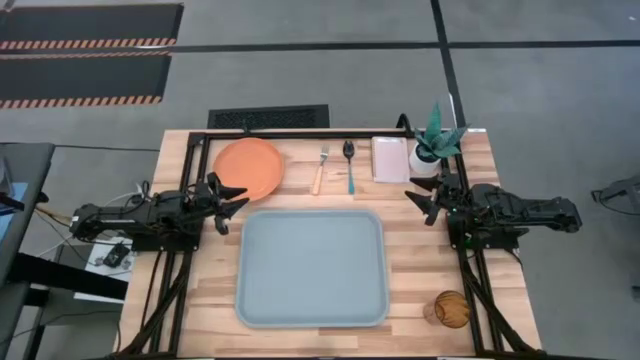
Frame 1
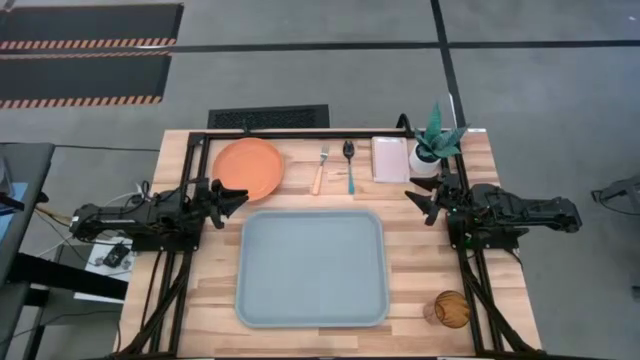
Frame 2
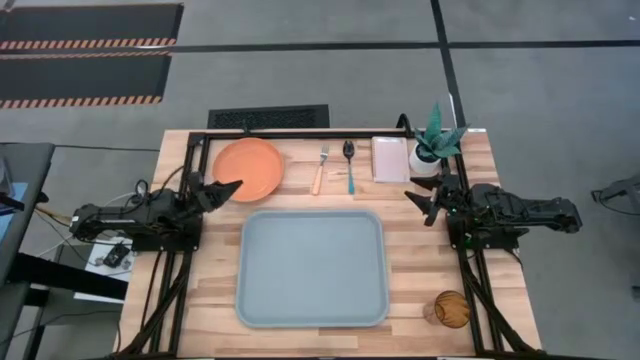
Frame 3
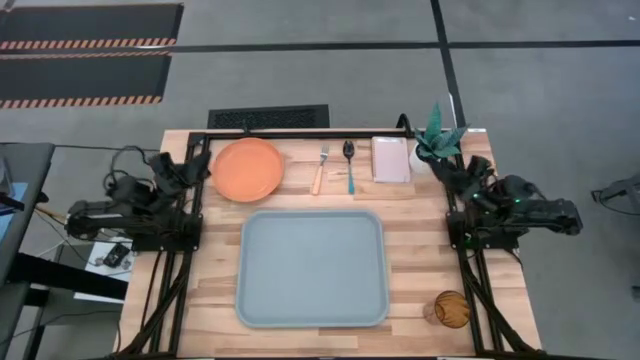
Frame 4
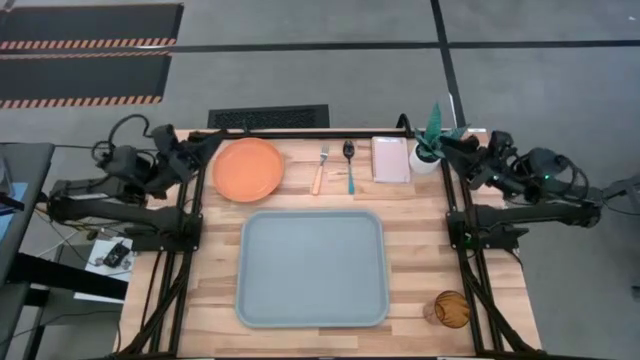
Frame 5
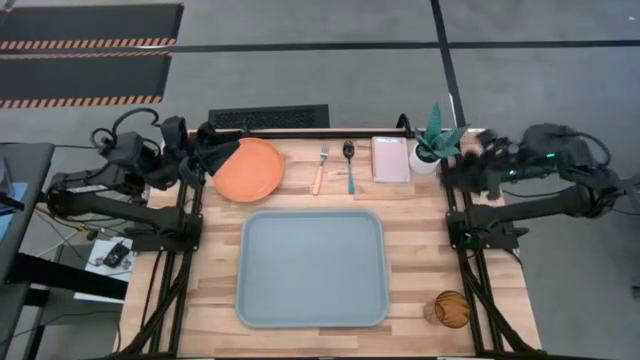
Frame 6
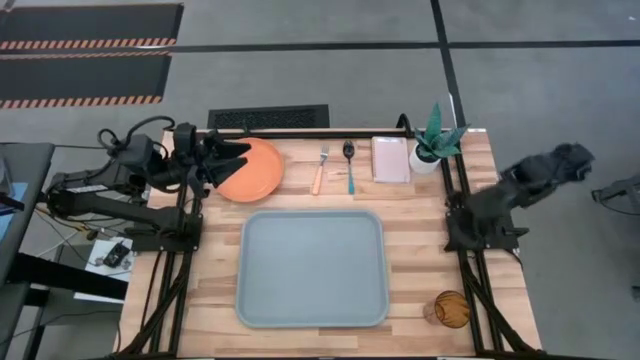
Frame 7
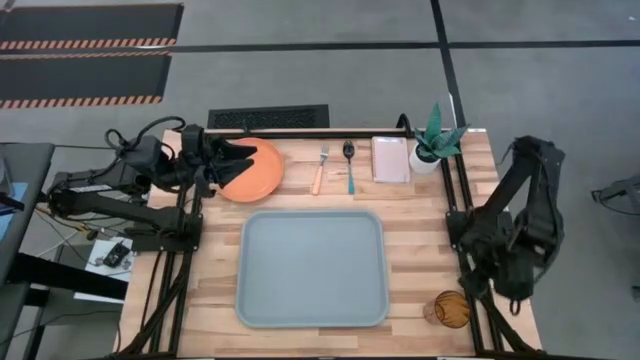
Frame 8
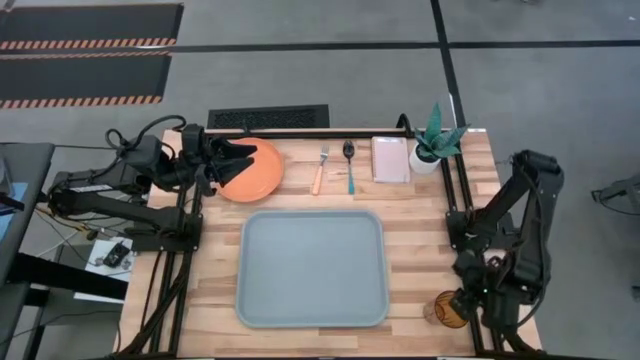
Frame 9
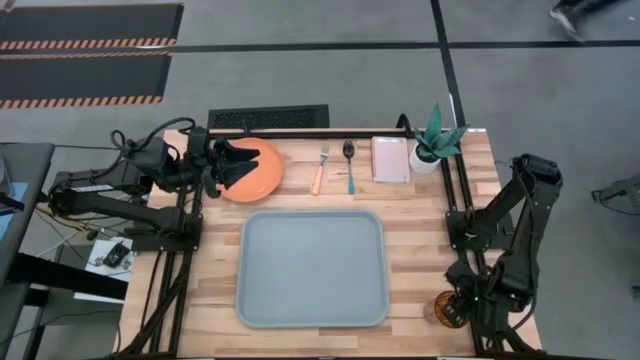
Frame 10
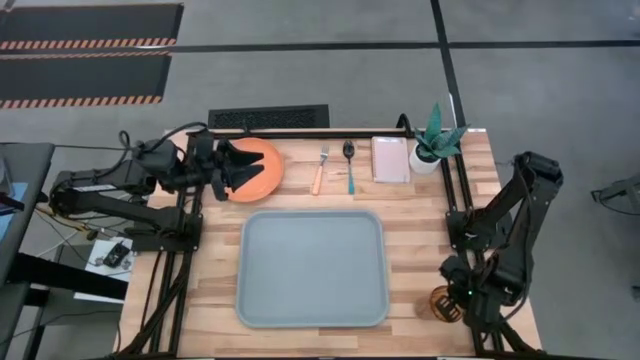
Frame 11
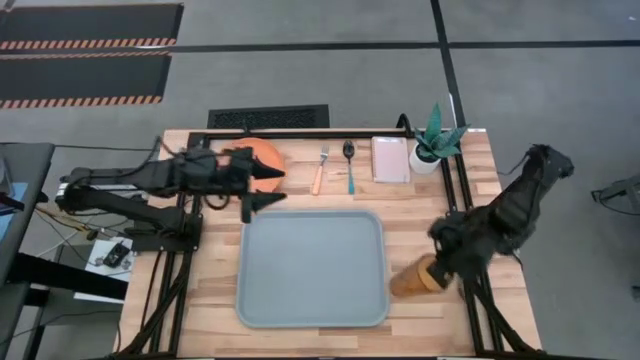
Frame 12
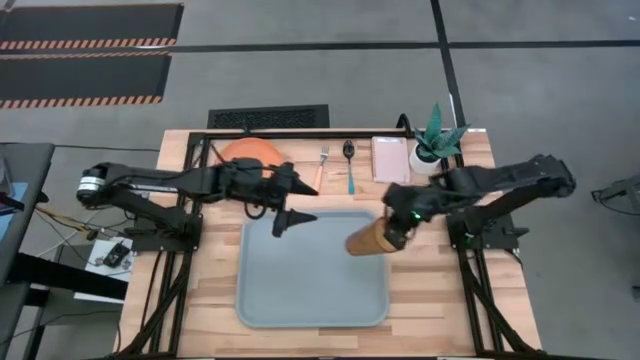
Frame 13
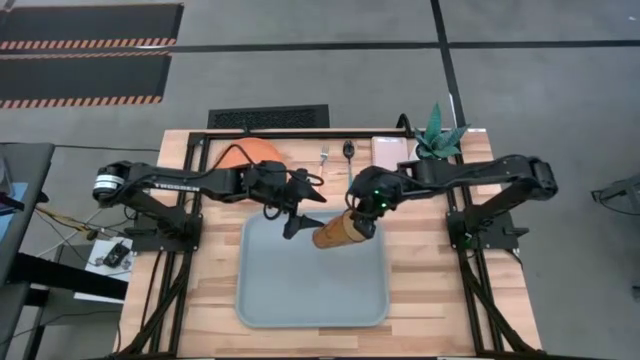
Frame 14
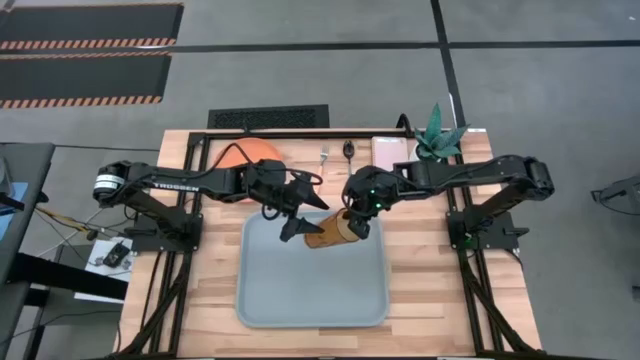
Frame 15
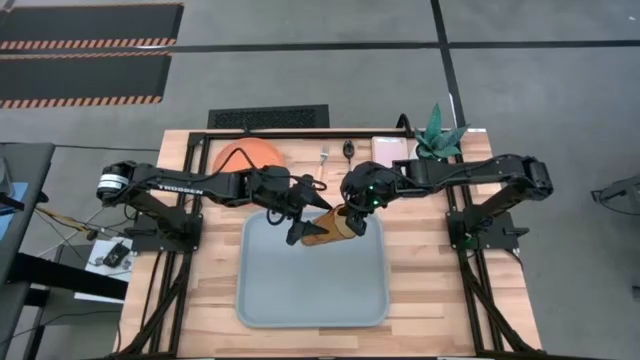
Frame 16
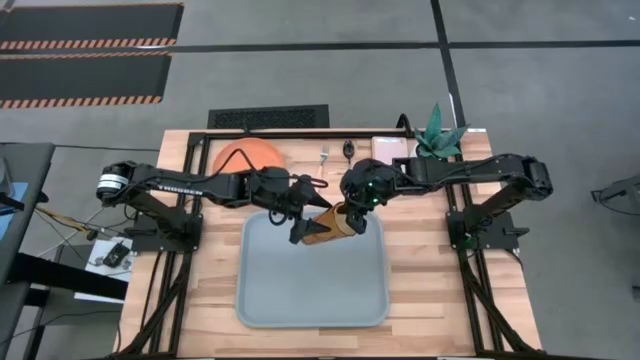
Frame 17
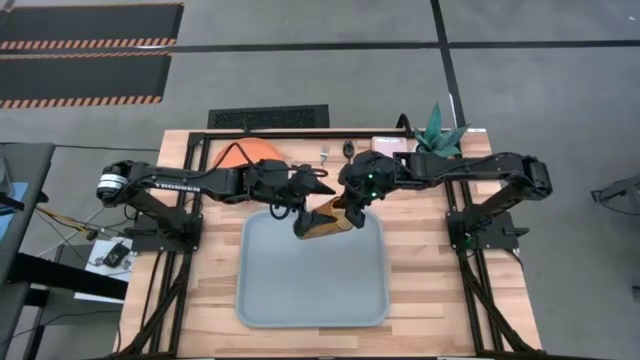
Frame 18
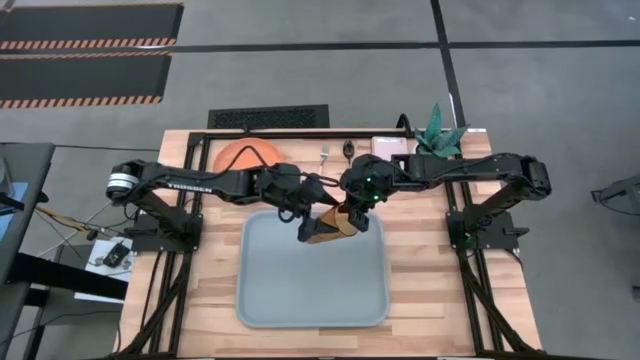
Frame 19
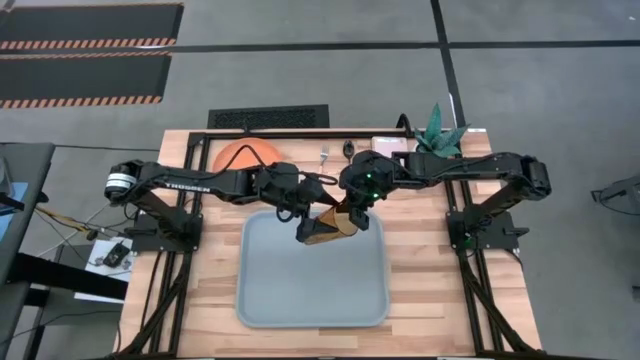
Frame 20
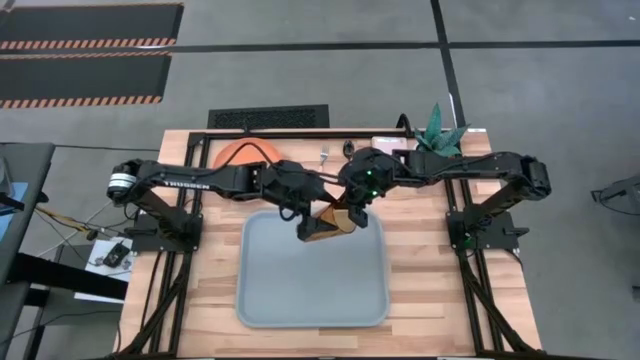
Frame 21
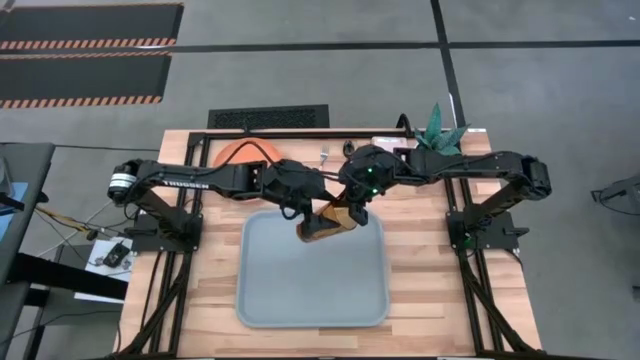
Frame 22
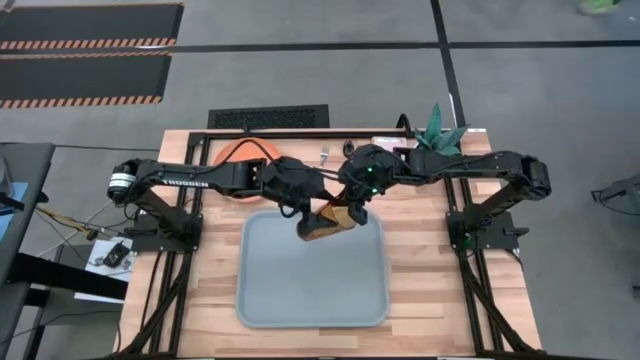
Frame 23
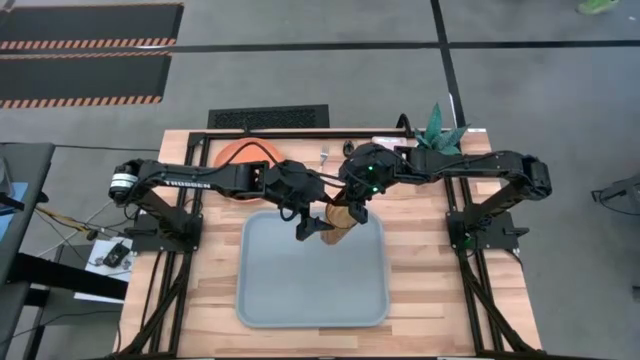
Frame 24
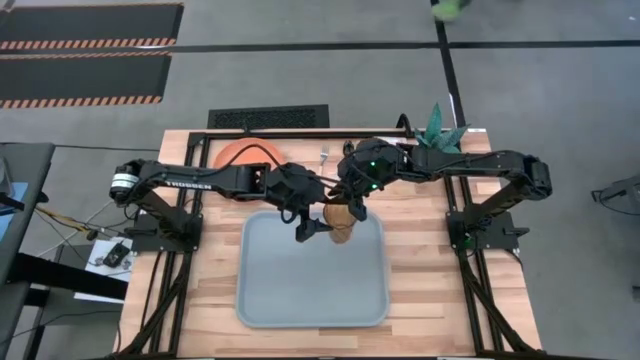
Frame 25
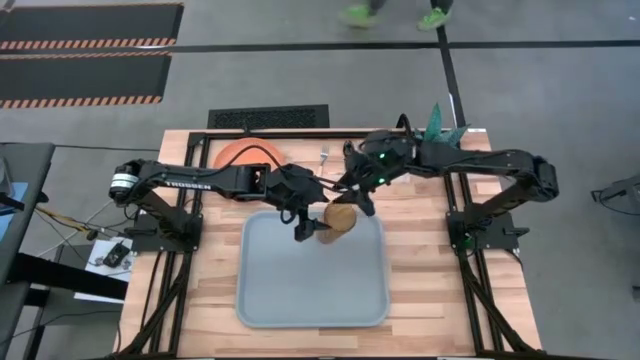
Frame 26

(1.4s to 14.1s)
Task: Pick and place plate/cup/fork/spoon on tray
Put the brown cup on the gray tray

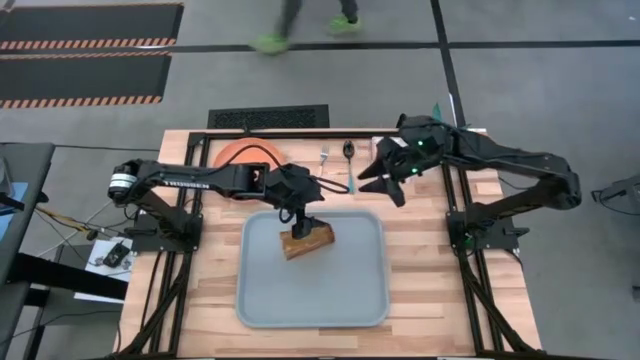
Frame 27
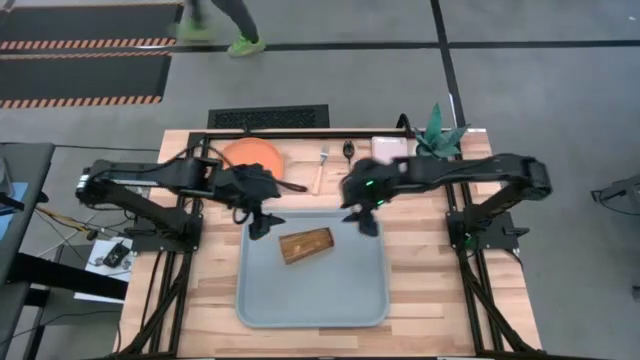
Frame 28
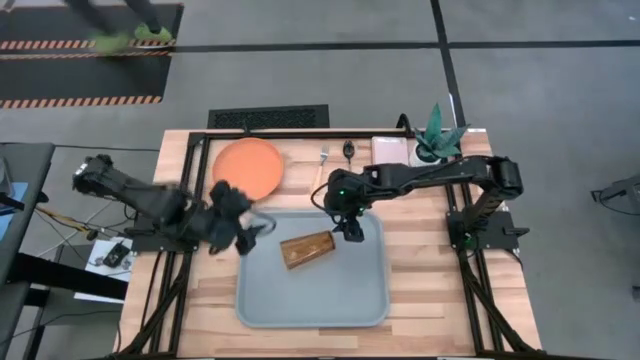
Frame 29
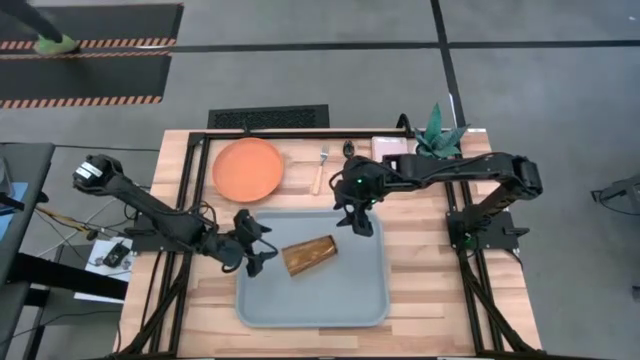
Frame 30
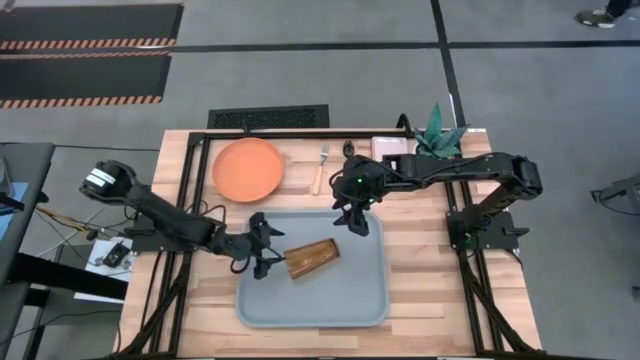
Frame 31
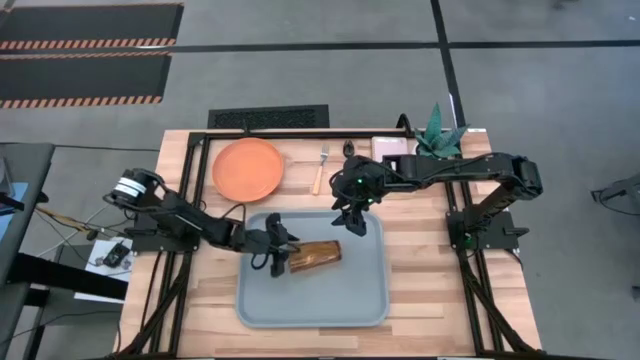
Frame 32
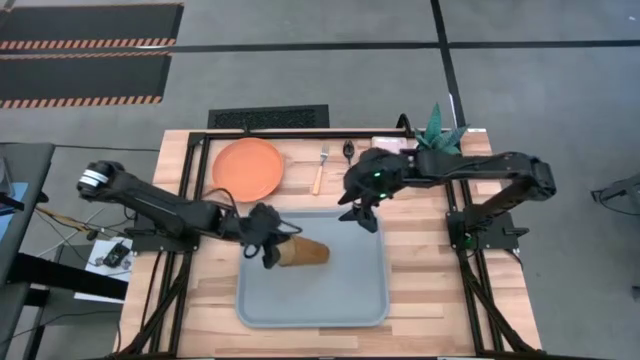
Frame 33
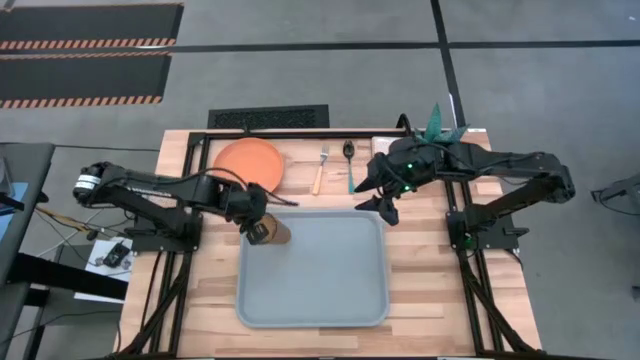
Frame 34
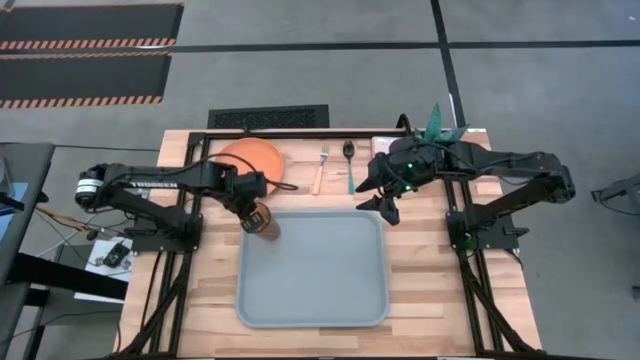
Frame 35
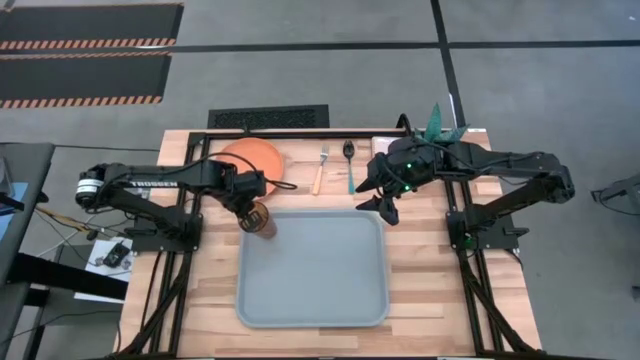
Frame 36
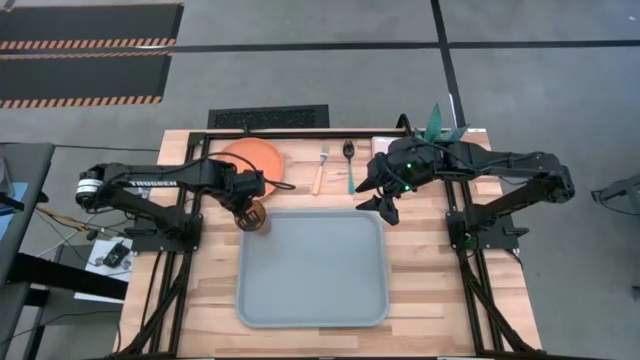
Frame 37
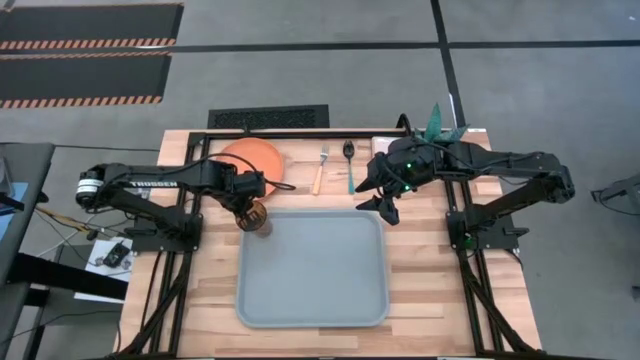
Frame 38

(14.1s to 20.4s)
Put the brown cup on the gray tray

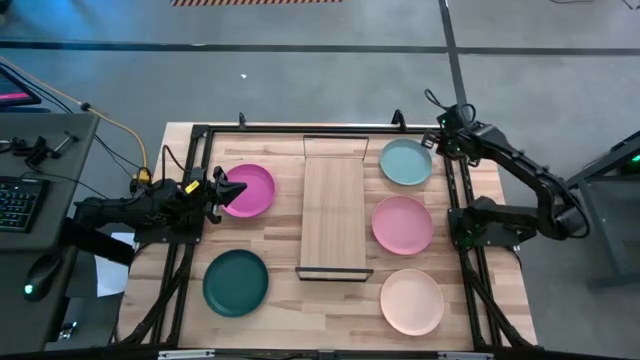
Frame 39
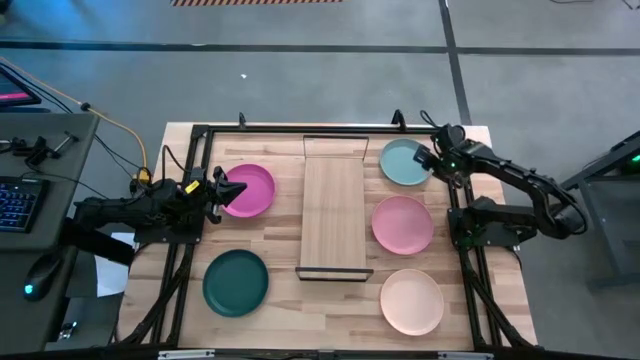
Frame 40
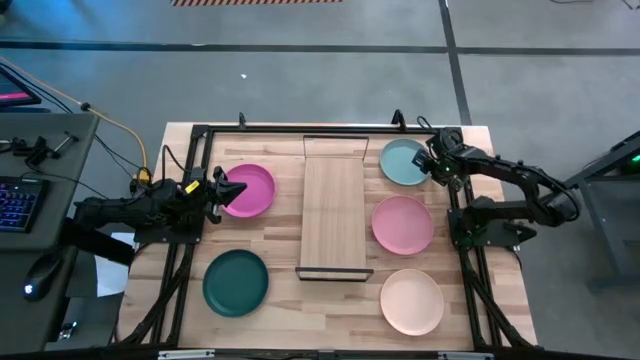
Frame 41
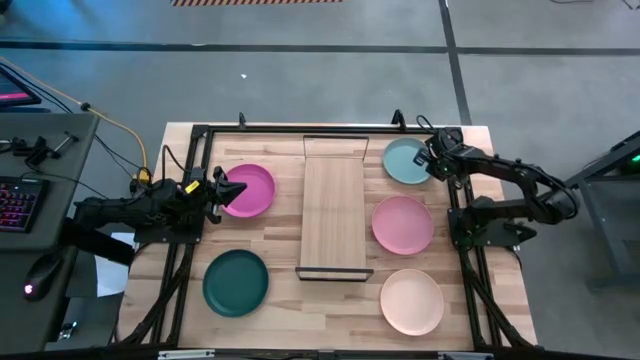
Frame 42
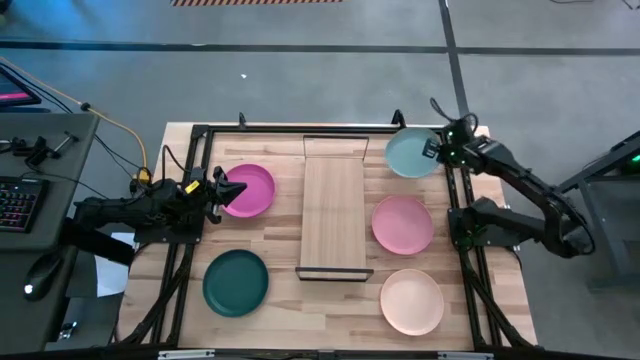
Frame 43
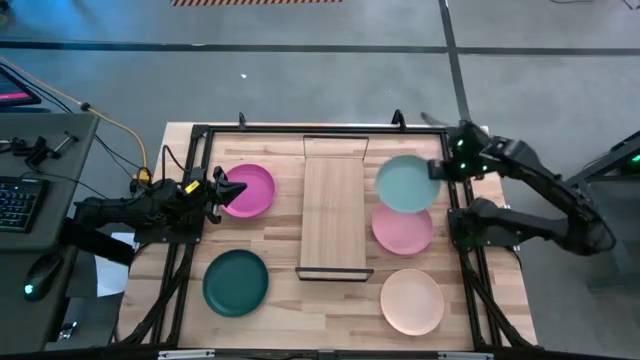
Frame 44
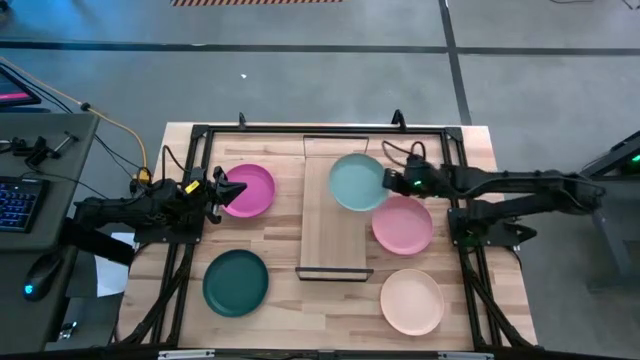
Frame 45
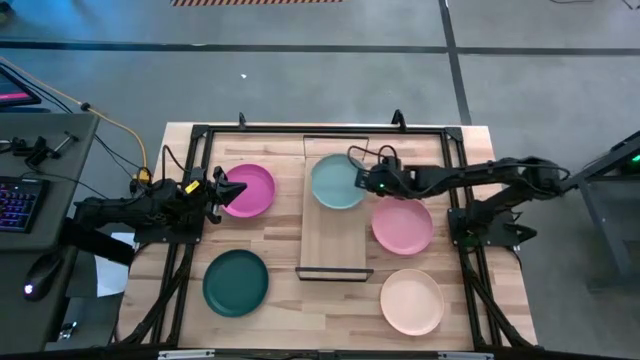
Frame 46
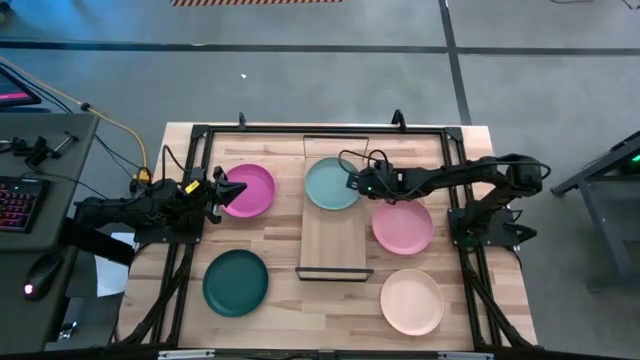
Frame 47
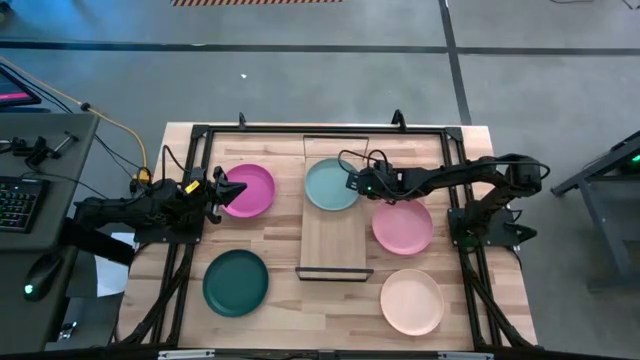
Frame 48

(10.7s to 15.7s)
Task: Place and stack plates onto a shelf
Put the blue plate on the shelf
